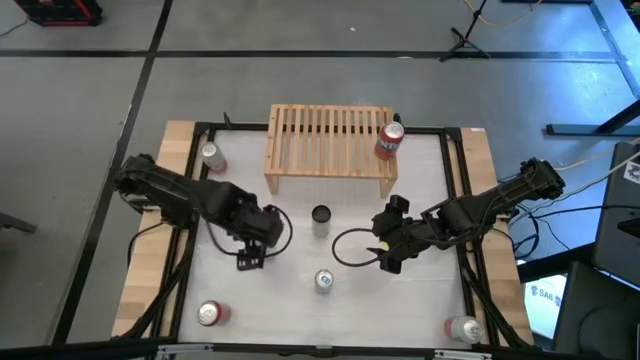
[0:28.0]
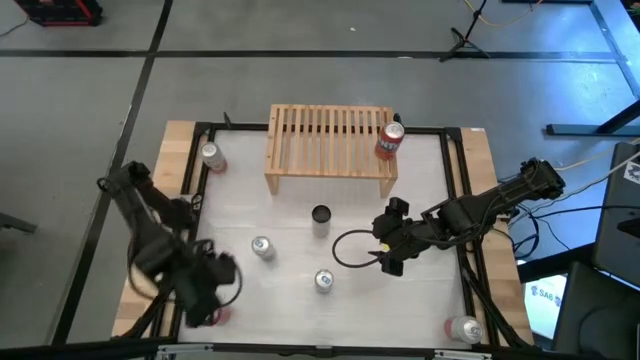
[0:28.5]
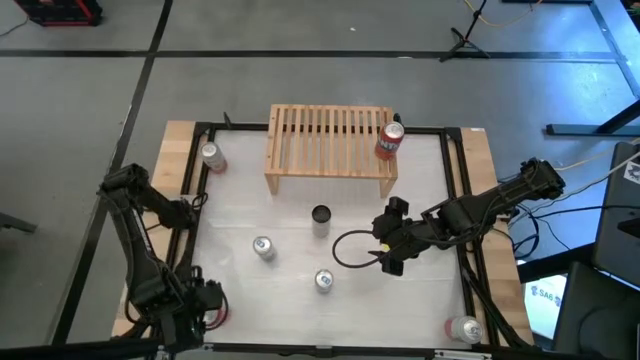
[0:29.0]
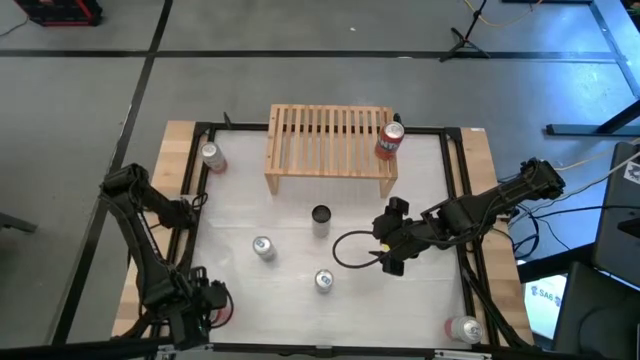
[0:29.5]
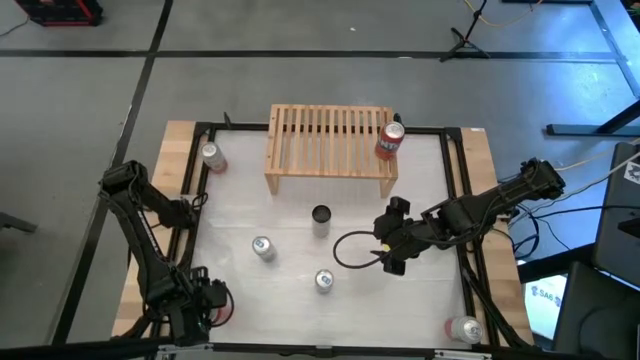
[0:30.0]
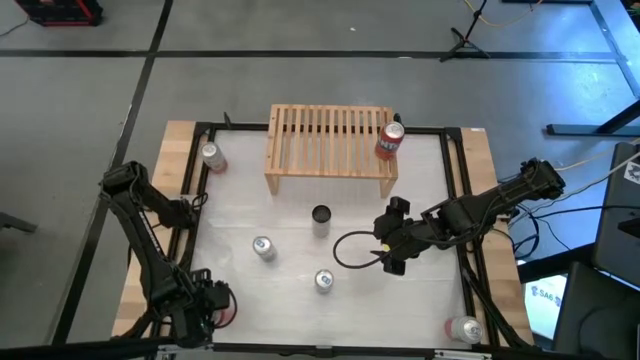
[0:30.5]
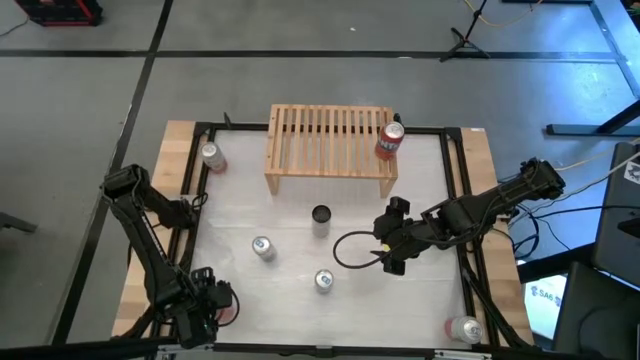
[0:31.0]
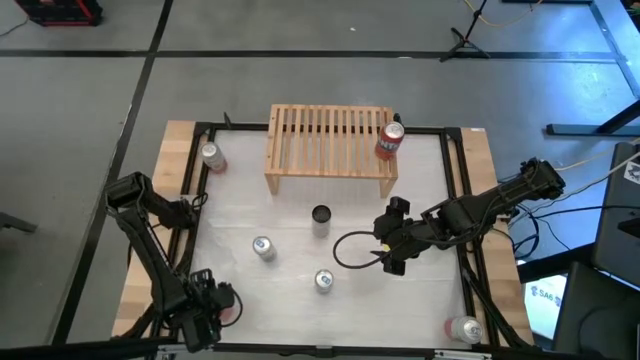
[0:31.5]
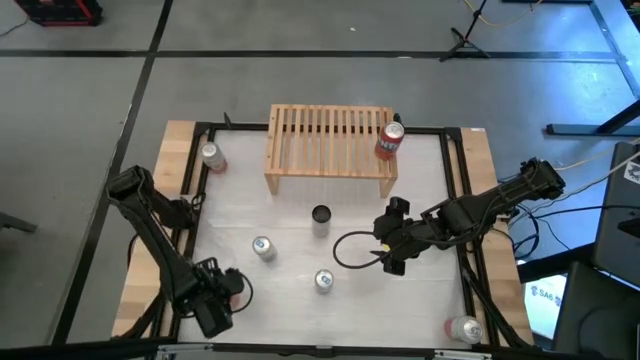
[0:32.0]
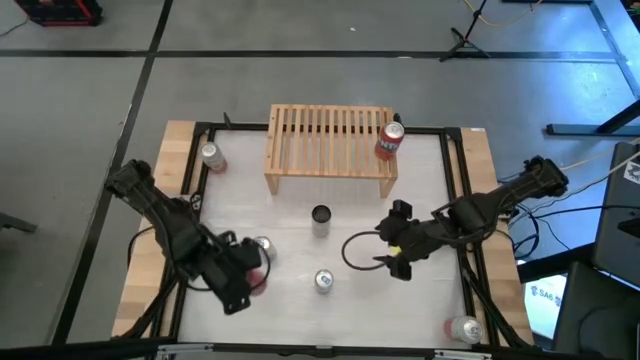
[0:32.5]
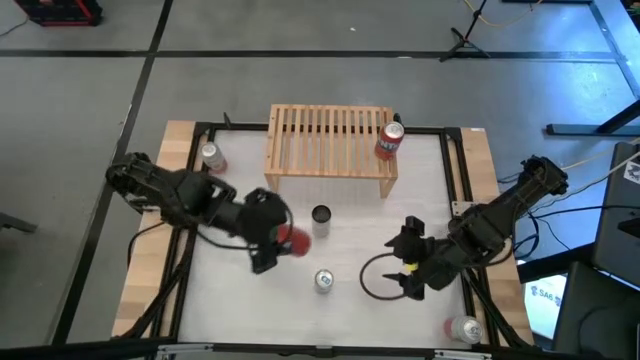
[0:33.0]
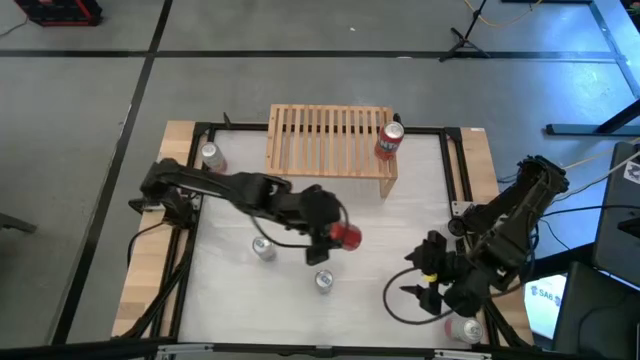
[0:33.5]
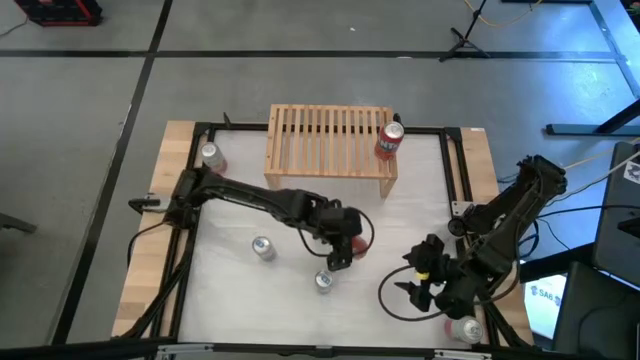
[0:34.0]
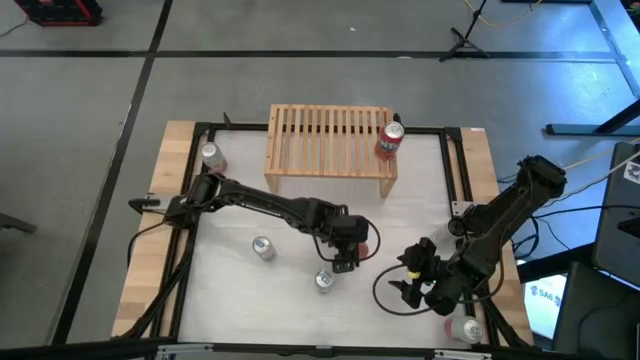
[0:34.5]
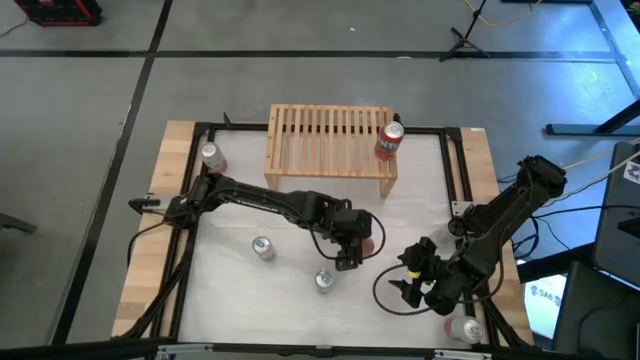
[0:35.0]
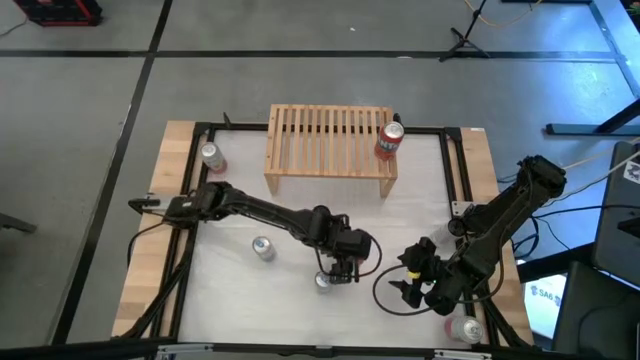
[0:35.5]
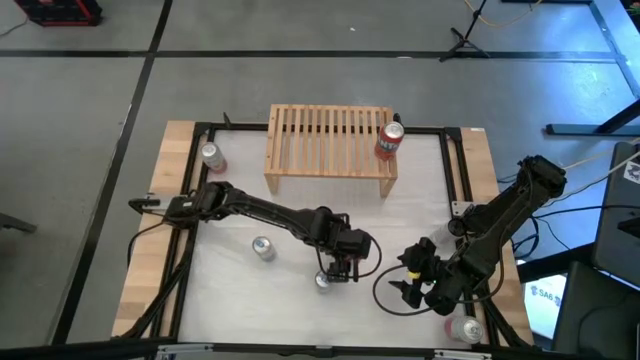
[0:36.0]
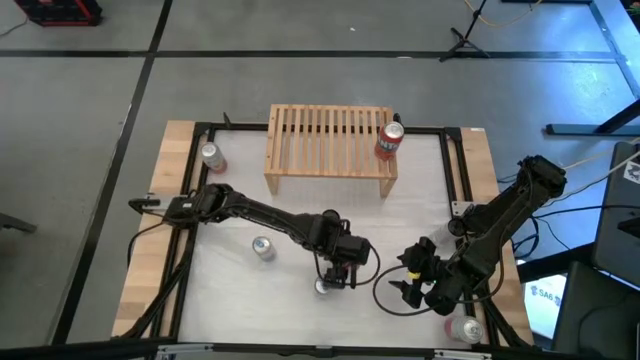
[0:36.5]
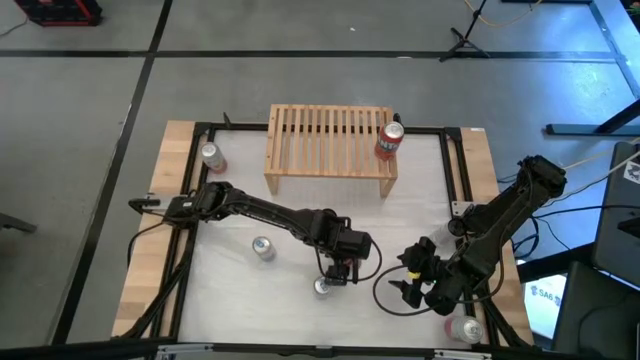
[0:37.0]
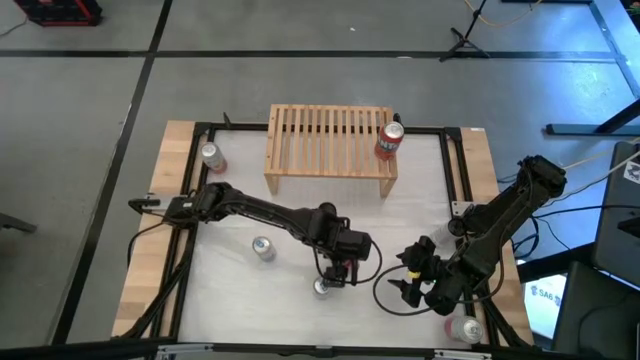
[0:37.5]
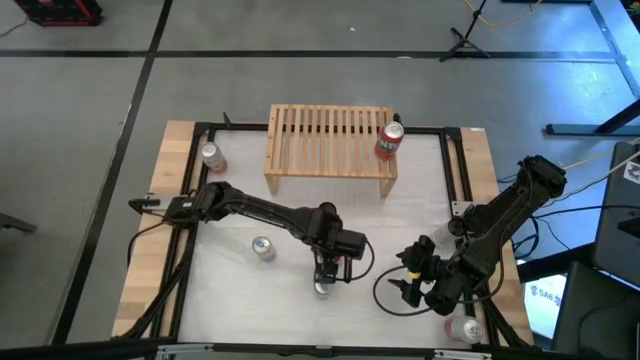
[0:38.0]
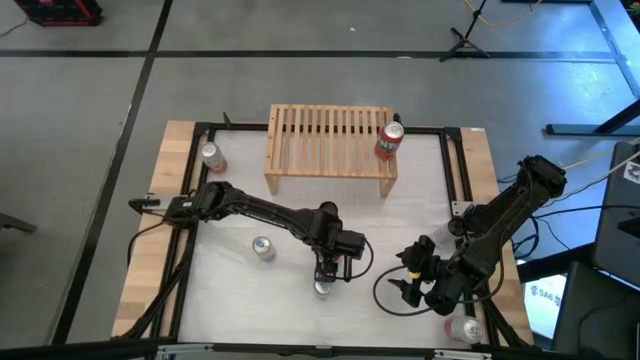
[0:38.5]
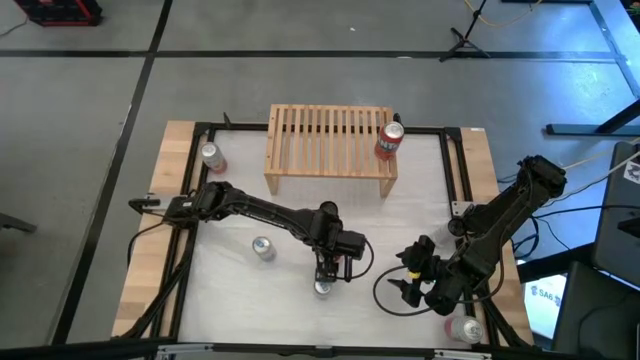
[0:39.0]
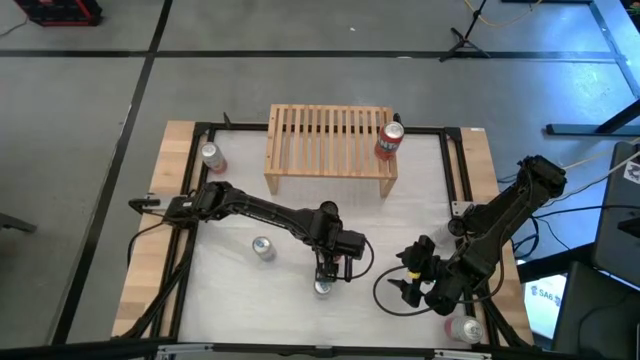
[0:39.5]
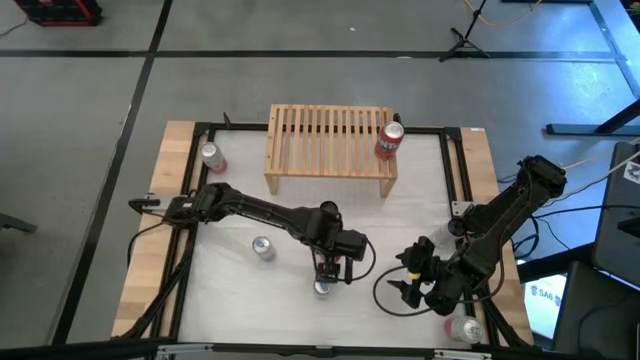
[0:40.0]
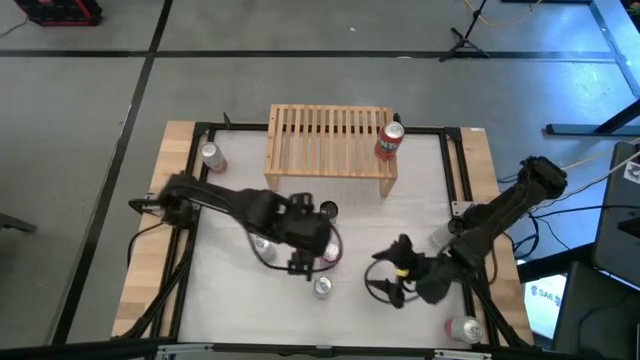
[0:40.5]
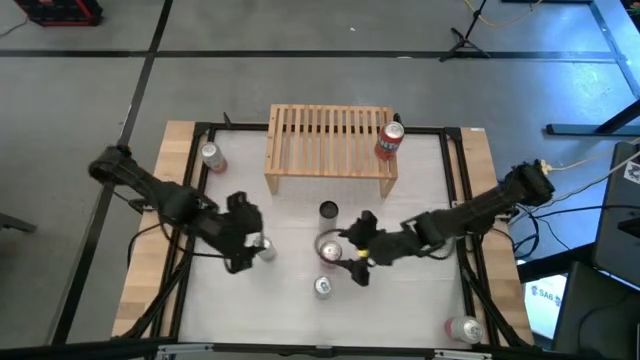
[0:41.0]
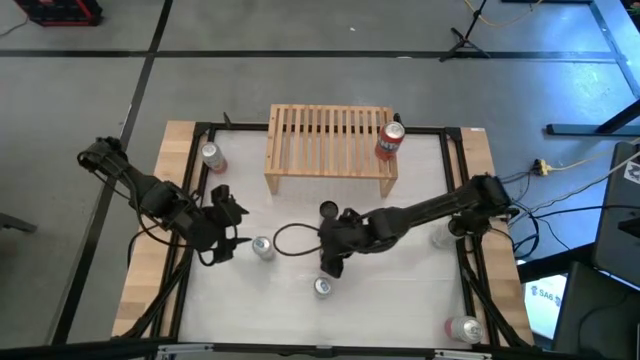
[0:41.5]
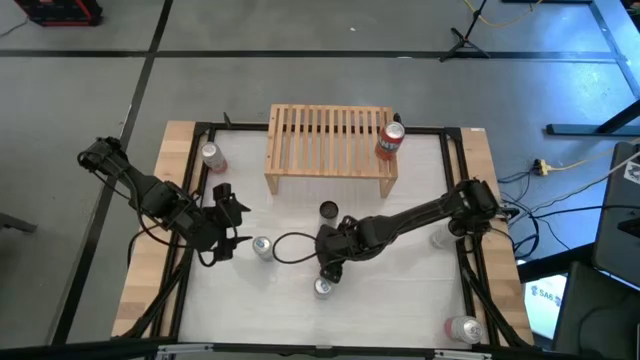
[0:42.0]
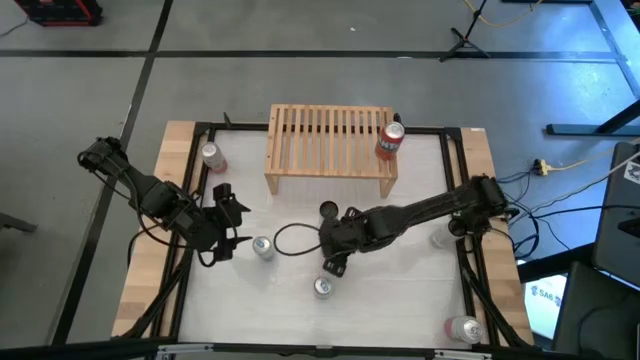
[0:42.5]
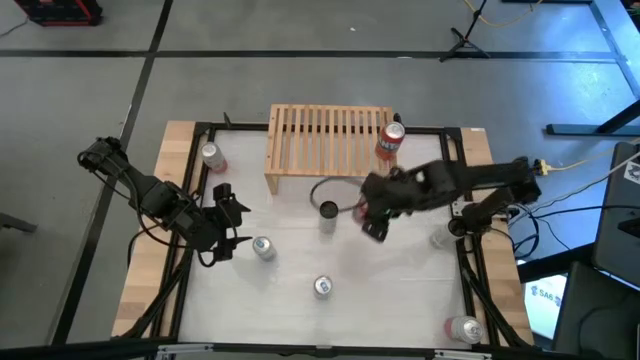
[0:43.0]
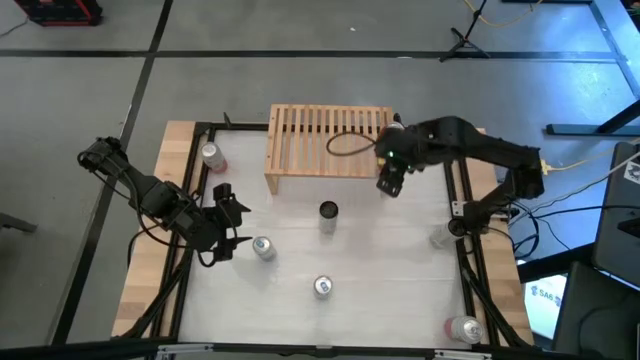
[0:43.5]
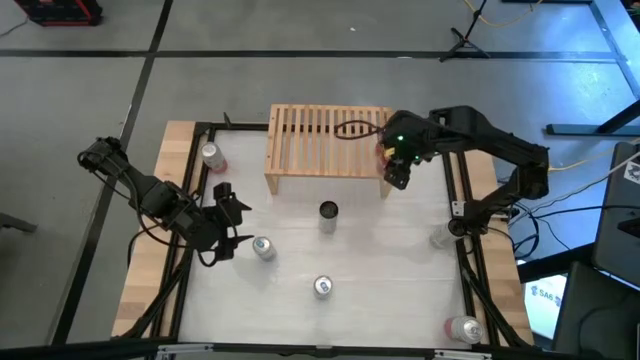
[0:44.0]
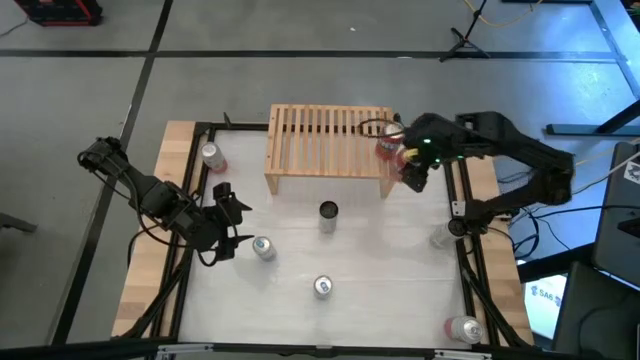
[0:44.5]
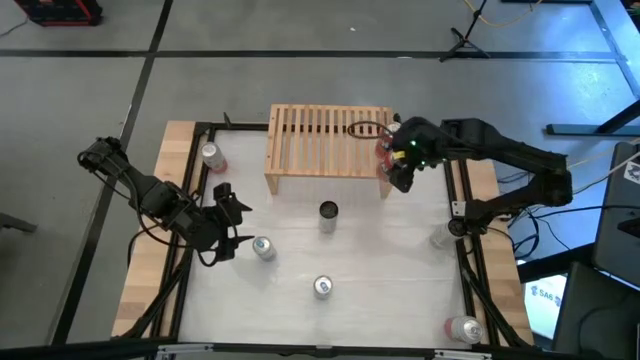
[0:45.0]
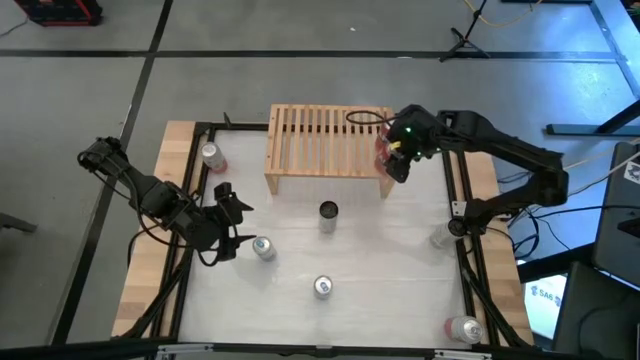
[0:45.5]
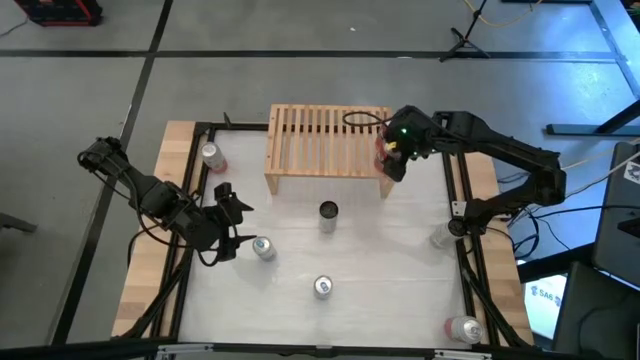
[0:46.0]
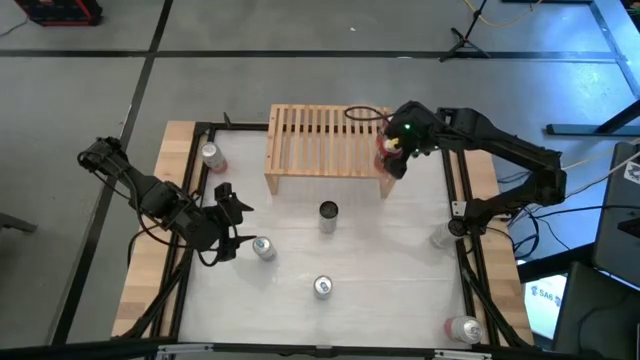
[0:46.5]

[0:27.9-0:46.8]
Task: Place canned beverage on shelf
Put the red soda can aligned with the other red soda can on the shelf

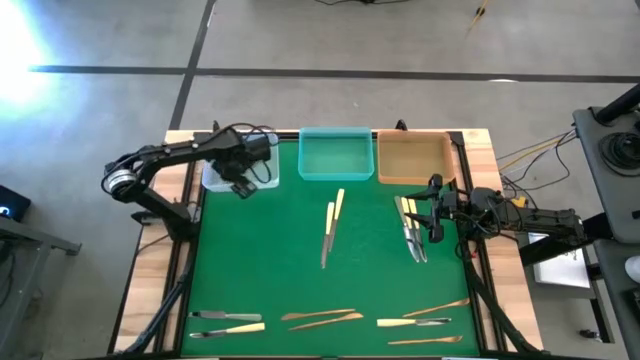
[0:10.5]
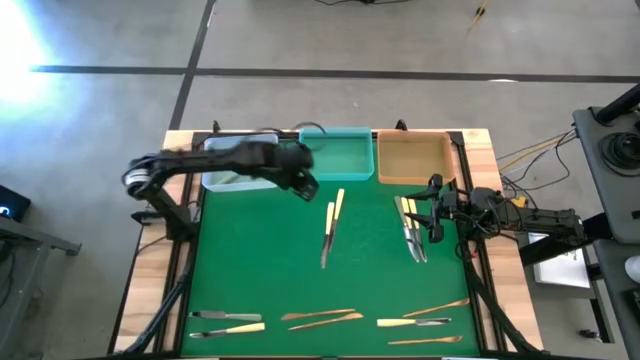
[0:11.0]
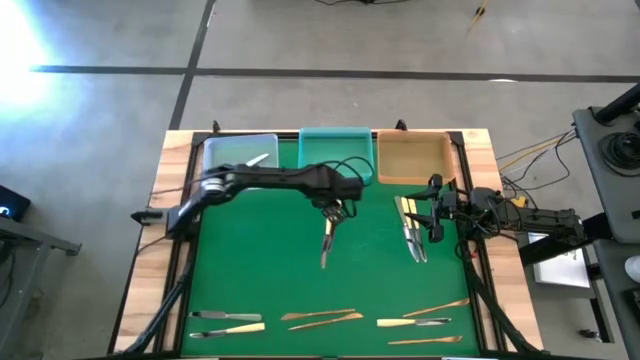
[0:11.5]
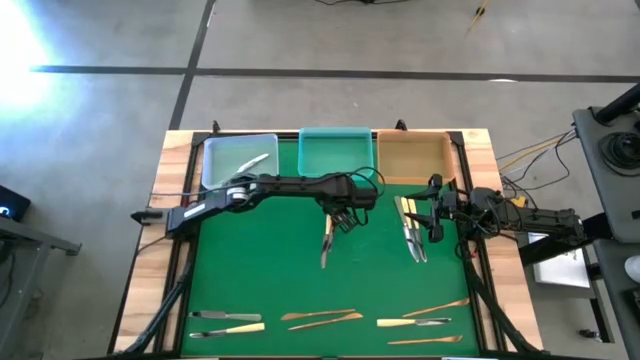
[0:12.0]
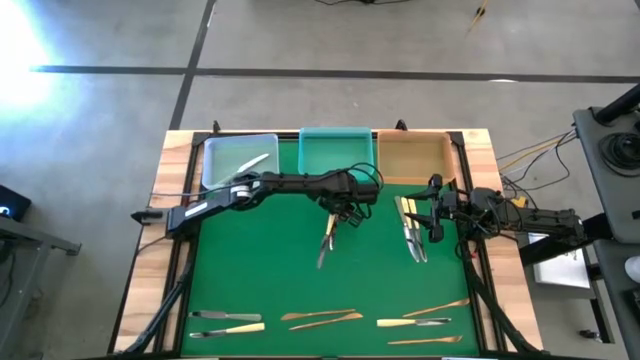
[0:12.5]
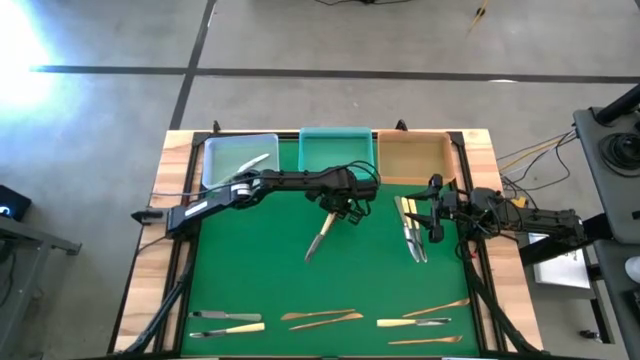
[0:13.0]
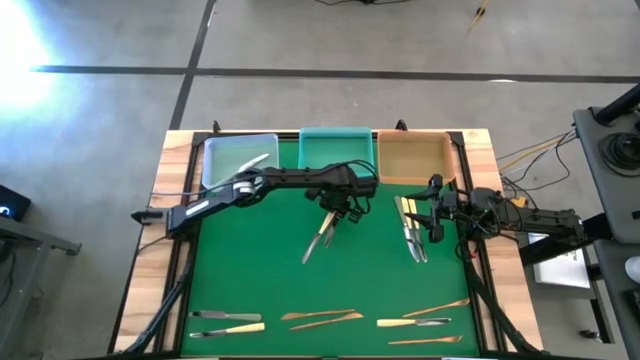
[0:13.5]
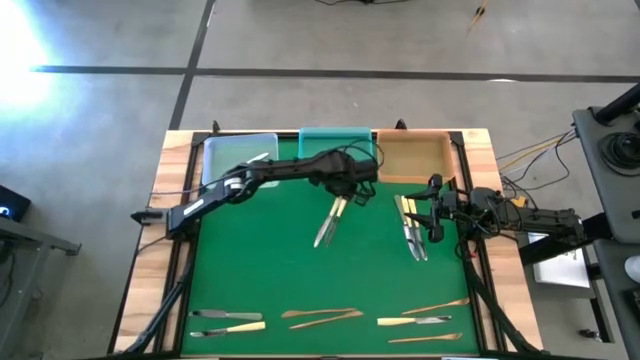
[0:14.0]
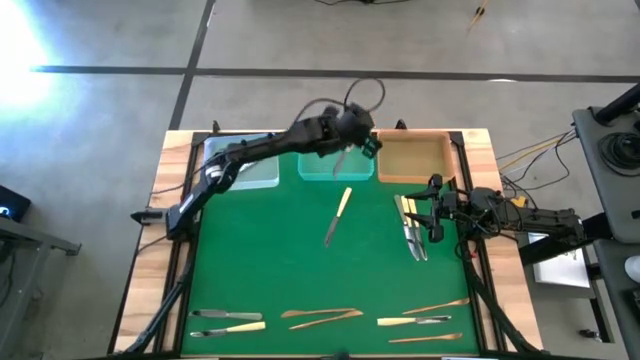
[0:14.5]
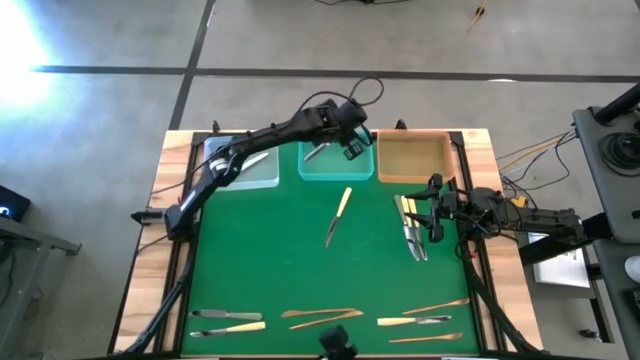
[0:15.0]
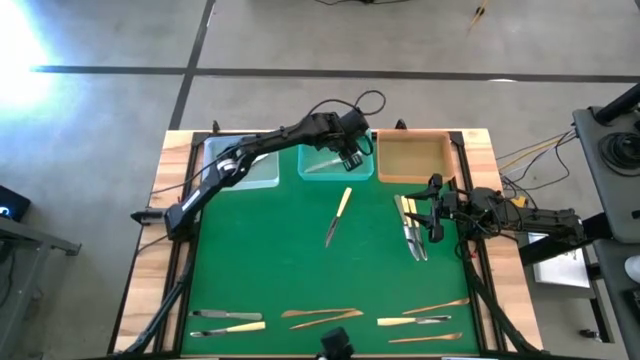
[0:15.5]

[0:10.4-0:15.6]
Task: Sort silverware by color (type)
Put the top center gold and silver knife into the blue bin
